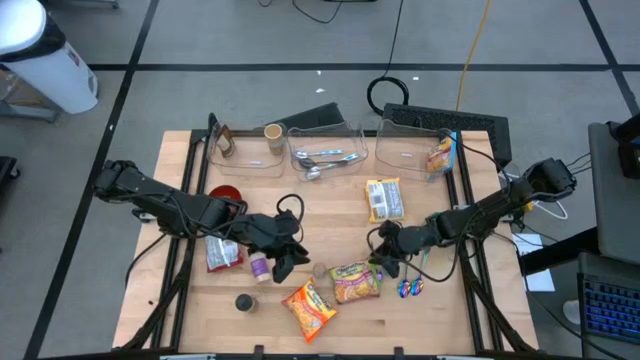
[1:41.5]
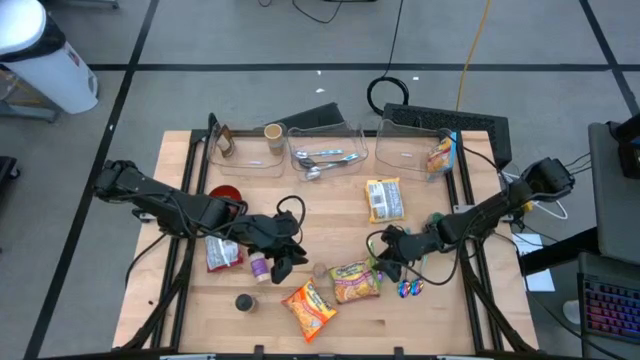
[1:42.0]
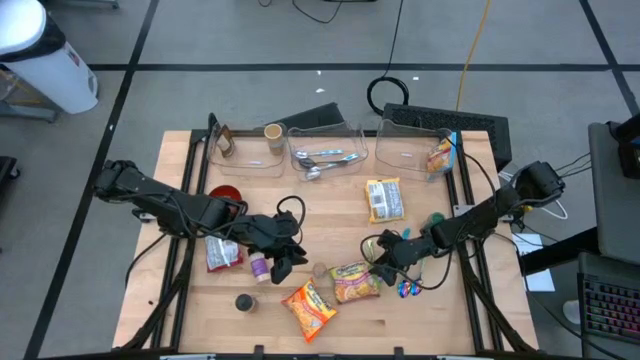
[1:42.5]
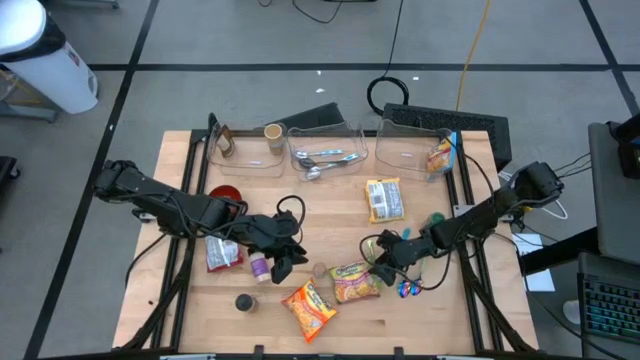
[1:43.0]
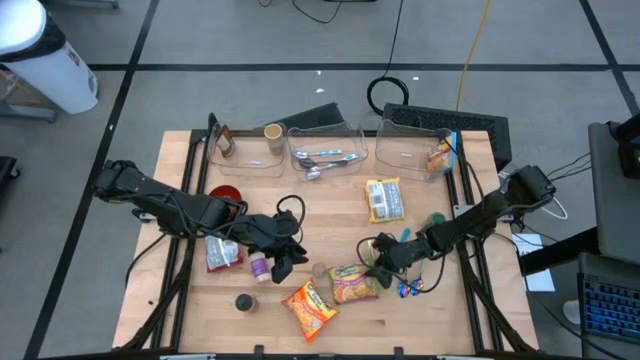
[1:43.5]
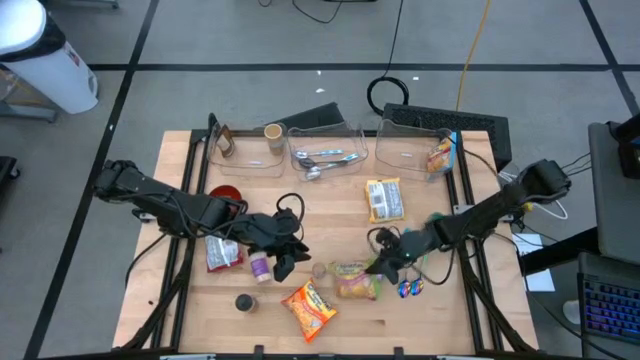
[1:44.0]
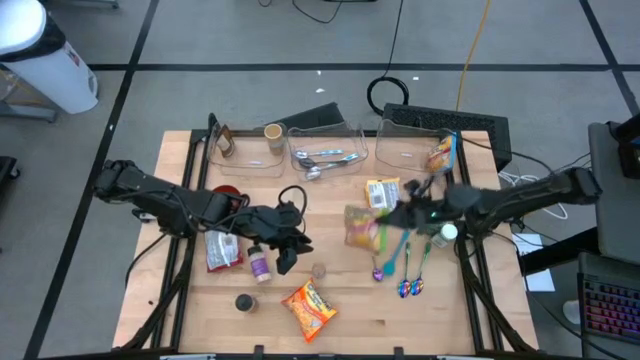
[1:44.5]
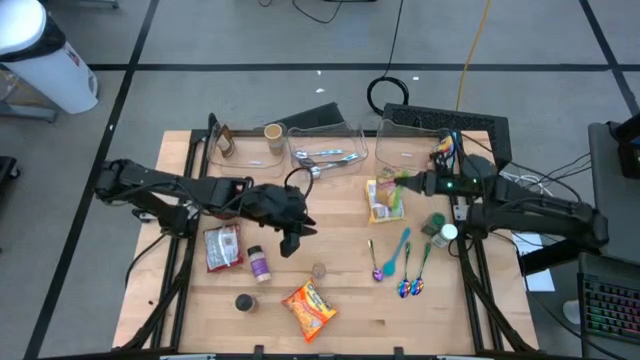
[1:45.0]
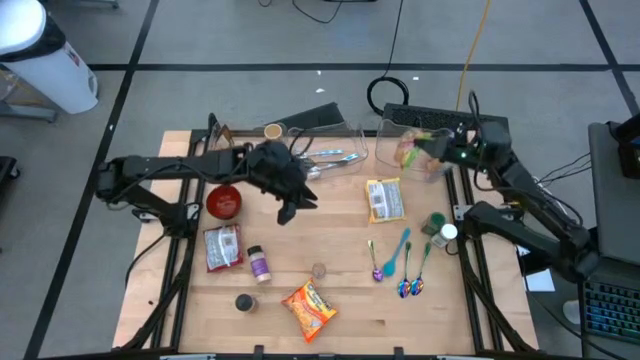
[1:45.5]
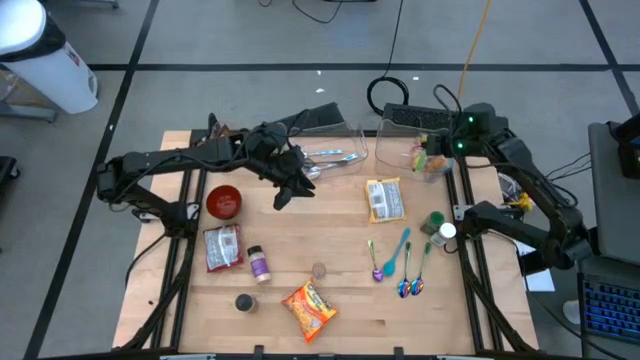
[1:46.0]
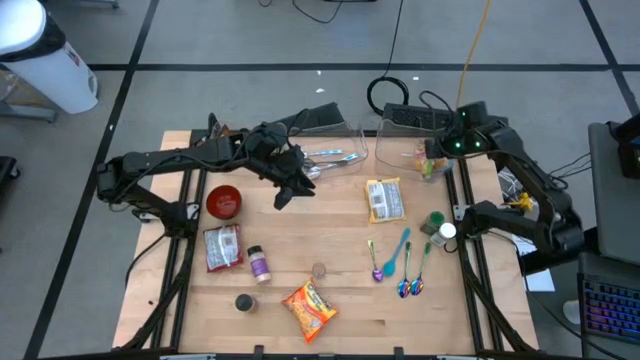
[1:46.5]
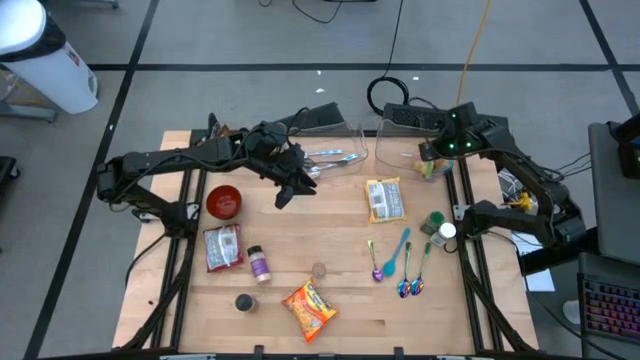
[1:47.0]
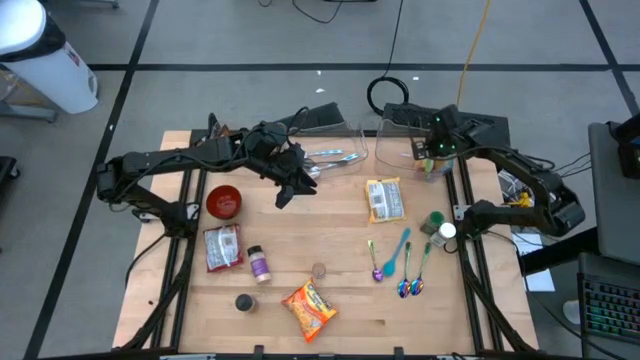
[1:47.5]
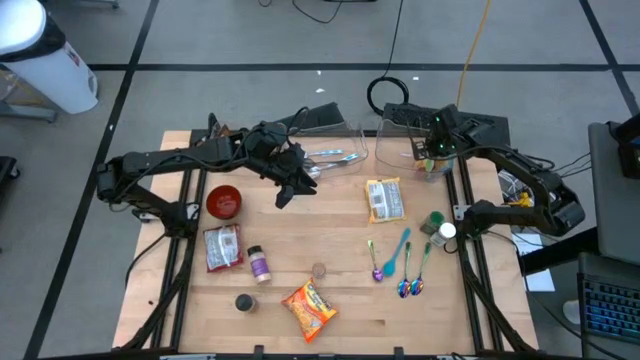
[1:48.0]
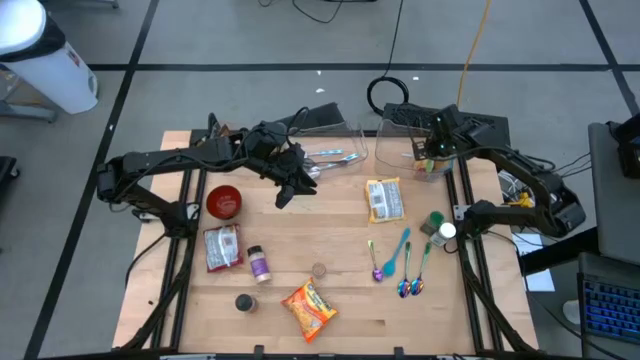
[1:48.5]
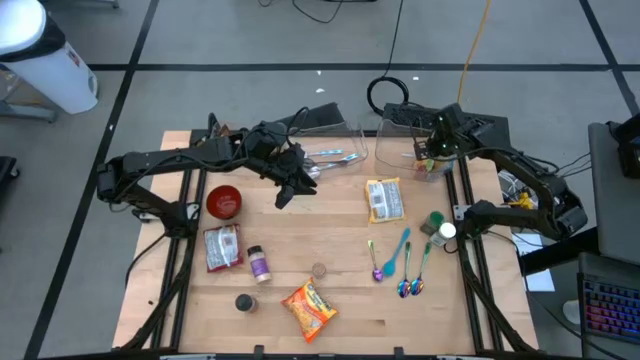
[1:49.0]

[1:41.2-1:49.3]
Task: Pick & Place Food Item
Put the green noodle pack into the right transparent bin

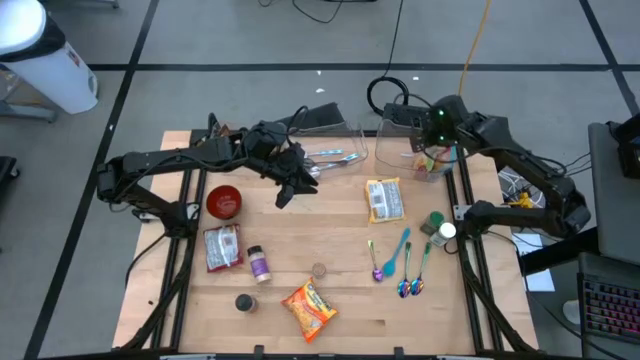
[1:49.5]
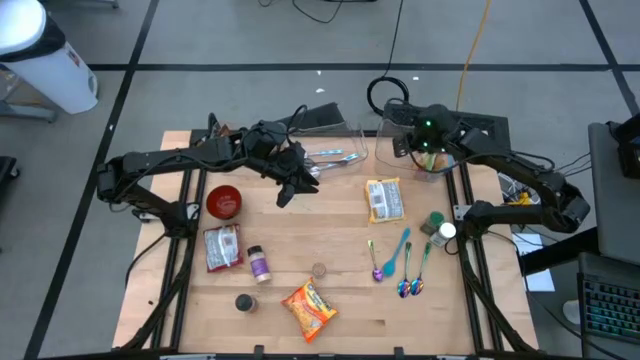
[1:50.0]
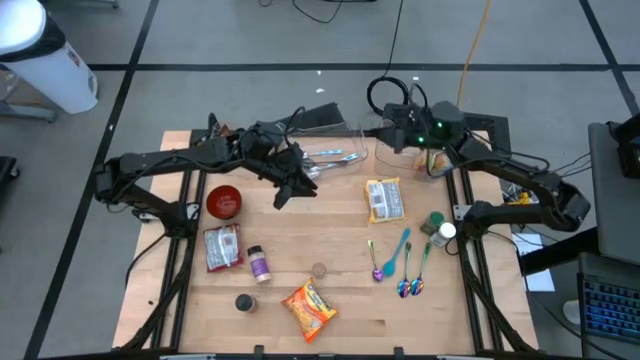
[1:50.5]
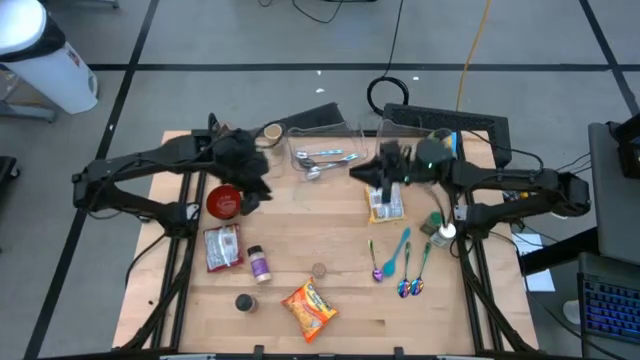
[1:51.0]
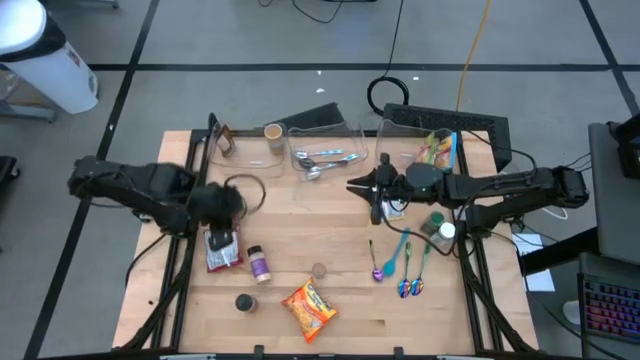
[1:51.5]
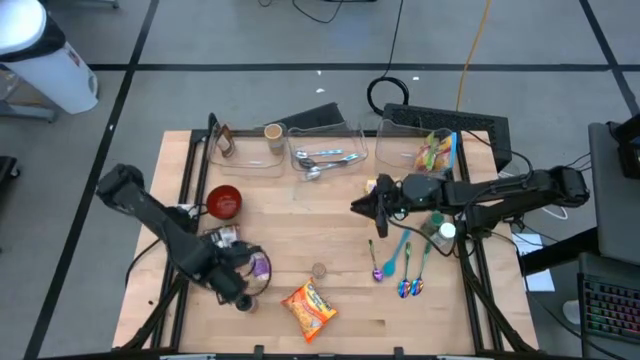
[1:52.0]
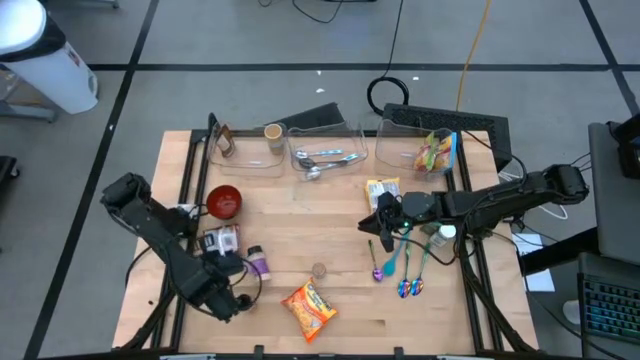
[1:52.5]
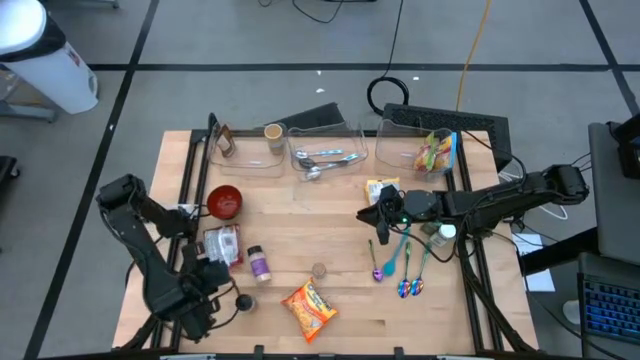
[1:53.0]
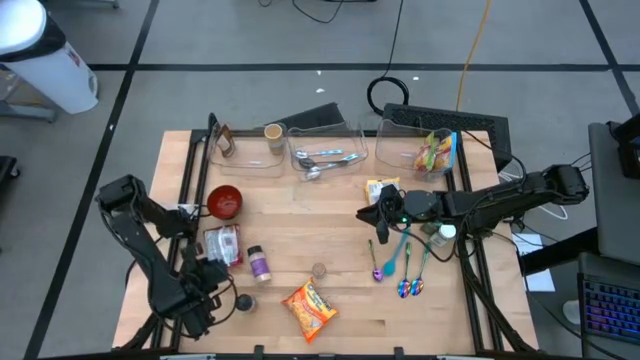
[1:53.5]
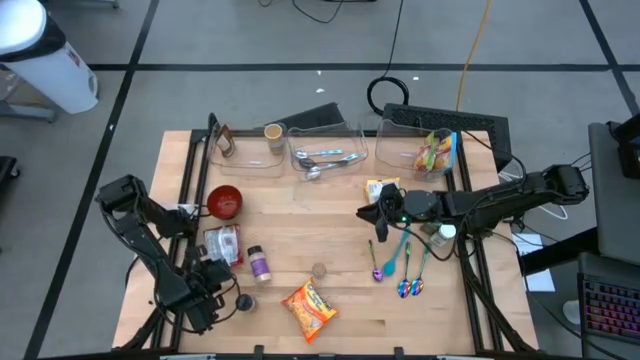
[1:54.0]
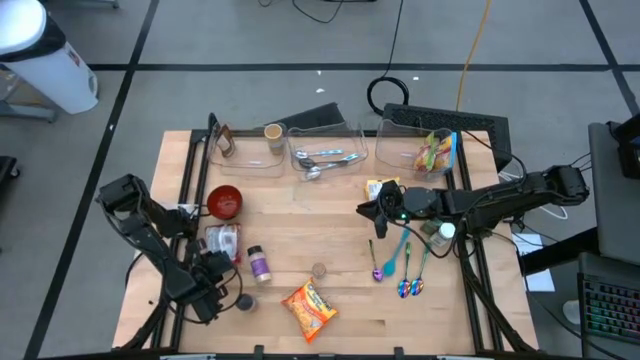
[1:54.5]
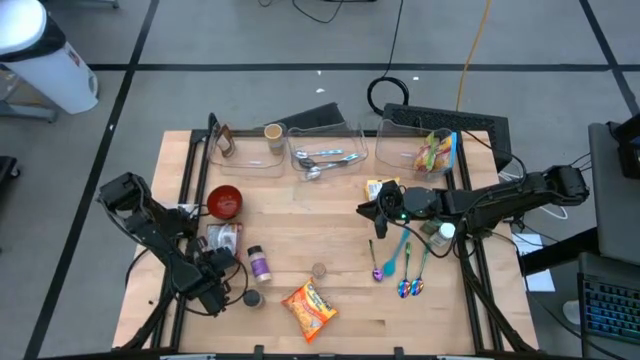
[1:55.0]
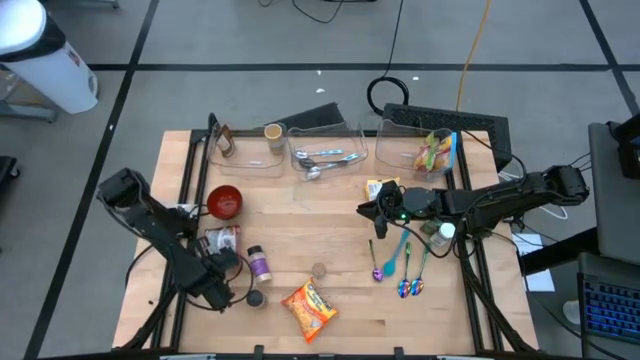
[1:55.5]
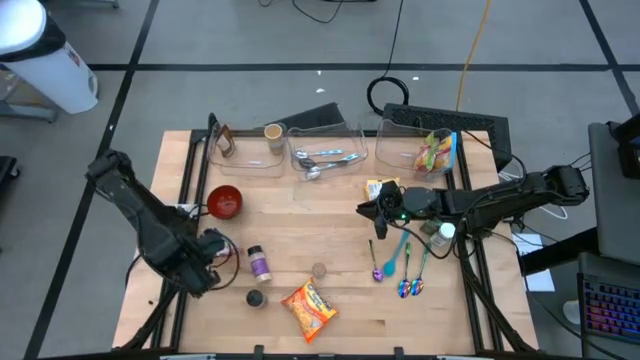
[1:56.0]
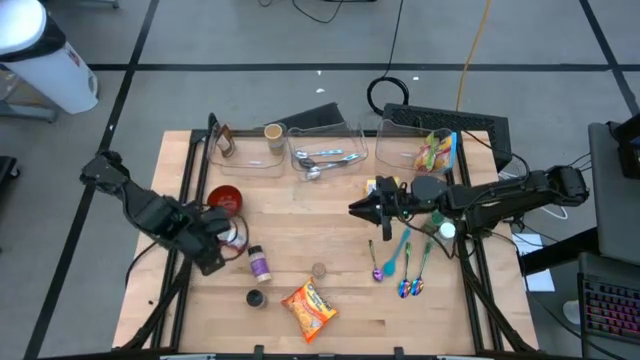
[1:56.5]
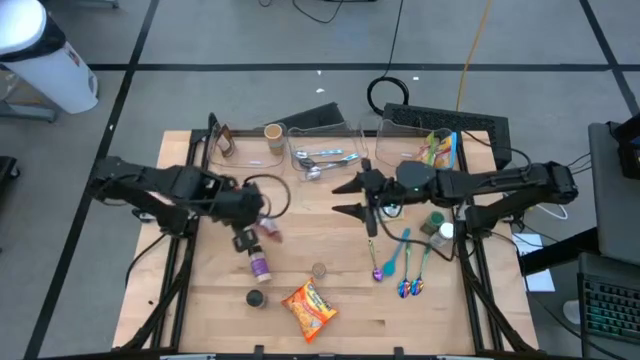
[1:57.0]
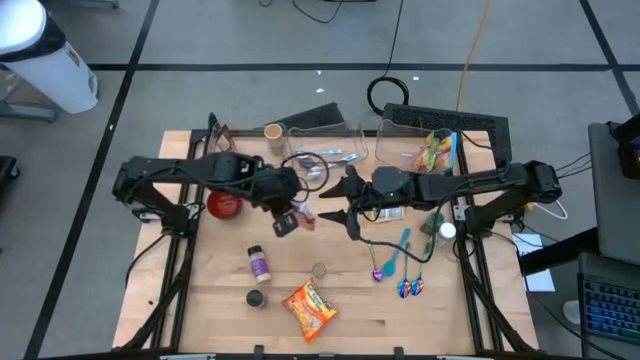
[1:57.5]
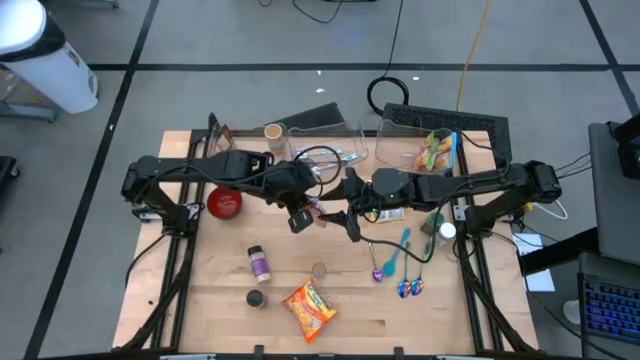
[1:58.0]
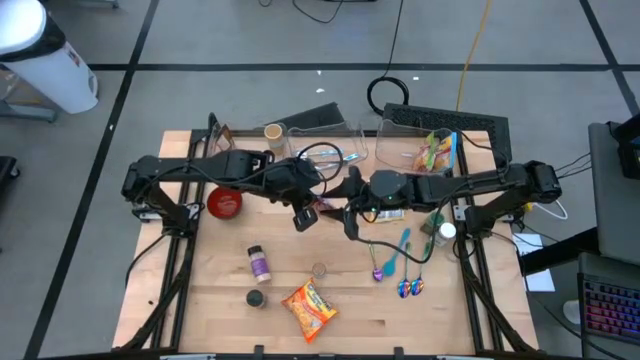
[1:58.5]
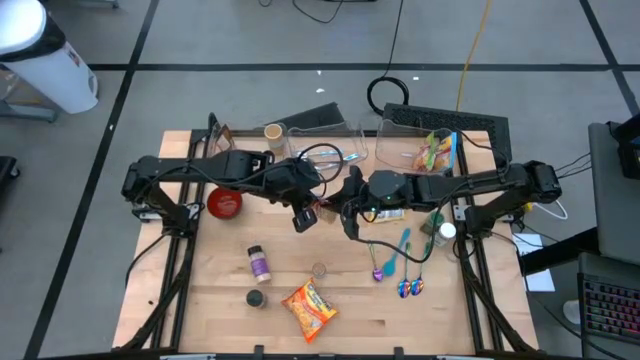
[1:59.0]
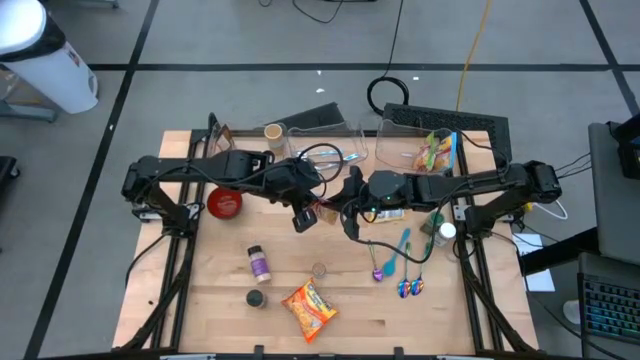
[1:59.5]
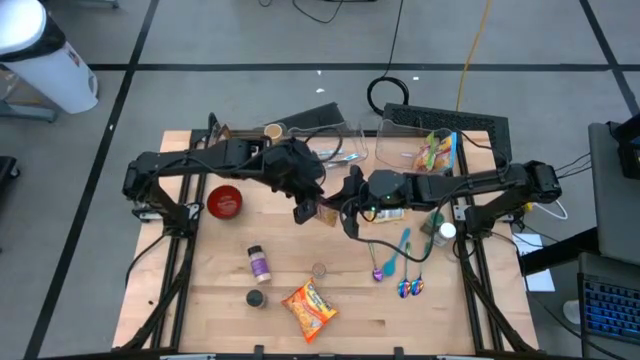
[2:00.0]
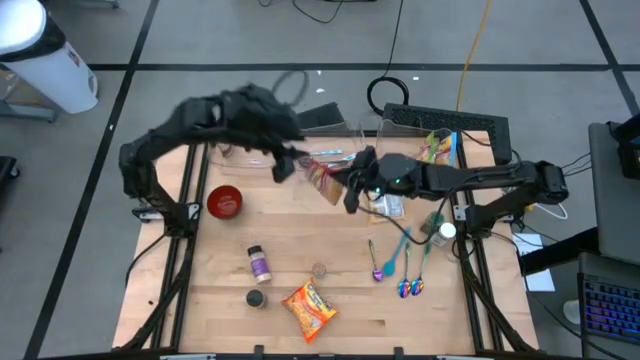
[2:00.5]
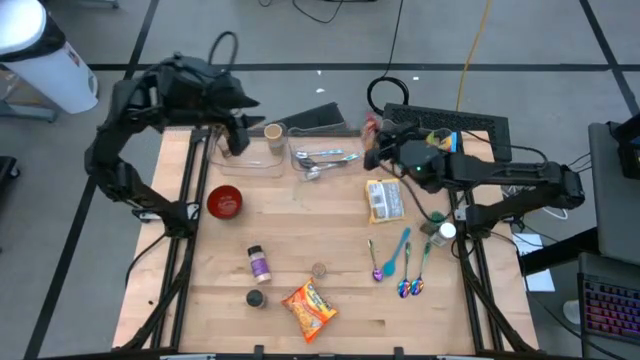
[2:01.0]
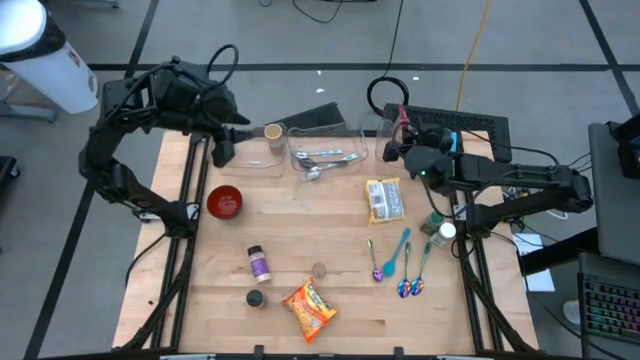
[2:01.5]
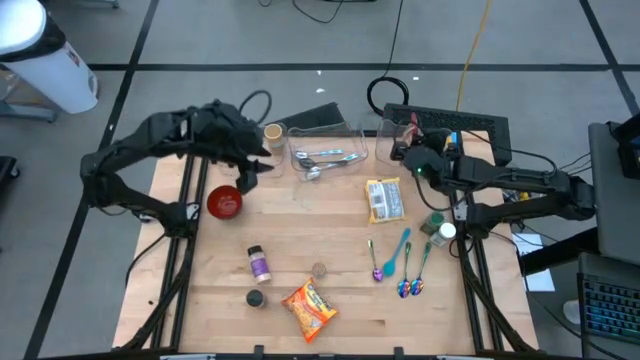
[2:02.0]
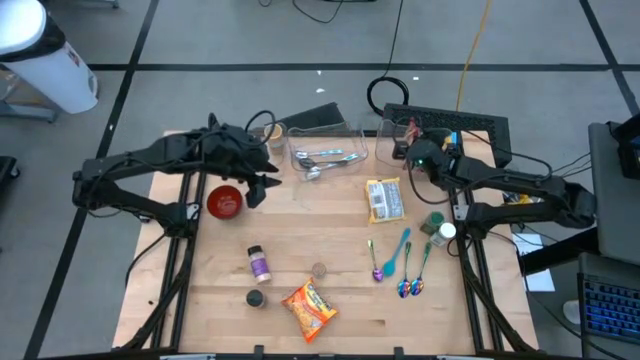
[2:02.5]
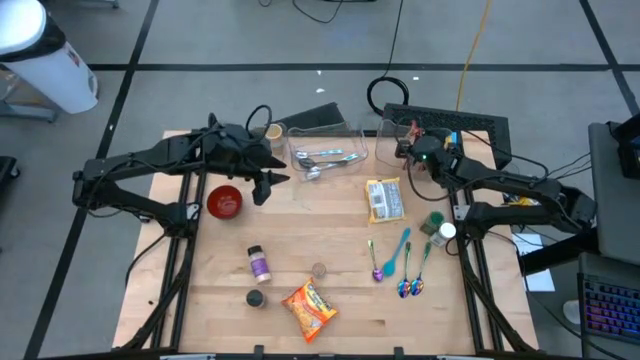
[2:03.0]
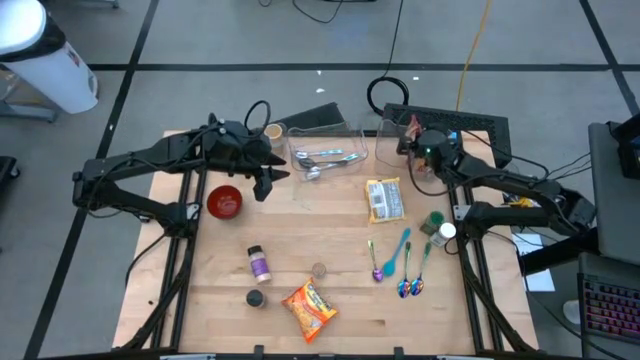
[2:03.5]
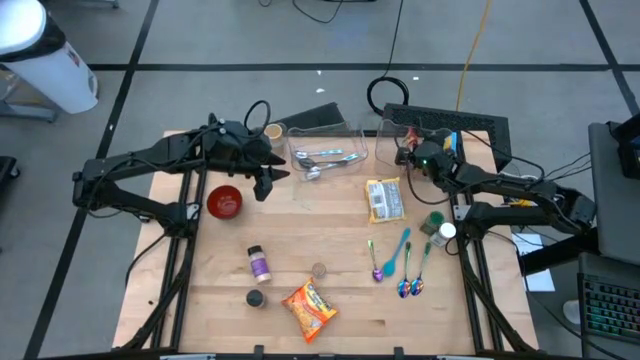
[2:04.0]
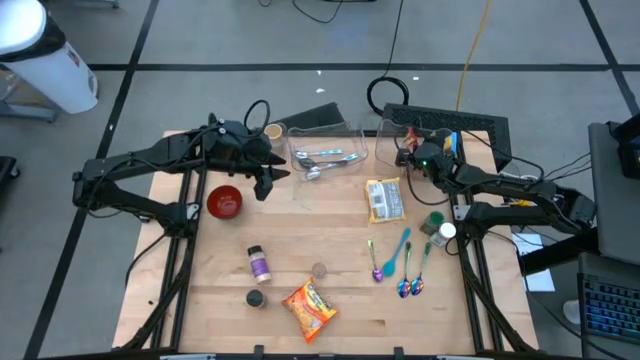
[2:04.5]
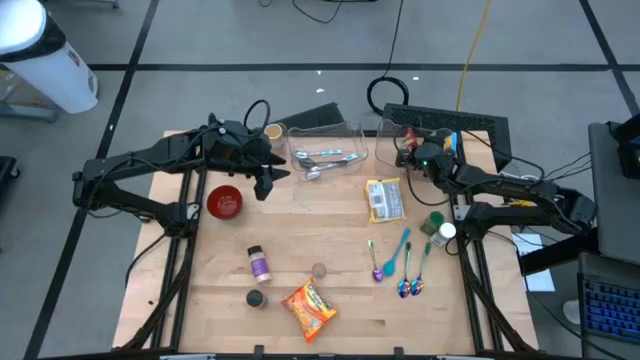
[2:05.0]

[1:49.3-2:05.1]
Put the red noodle pack into the right transparent bin
